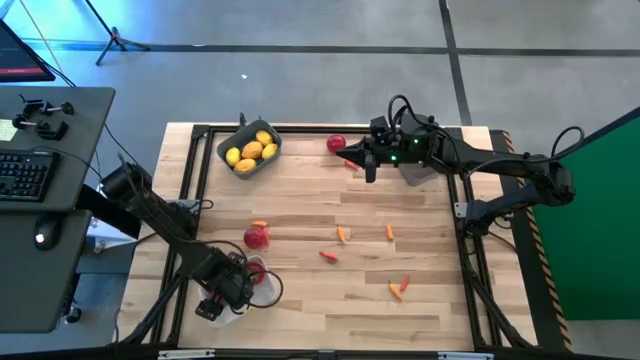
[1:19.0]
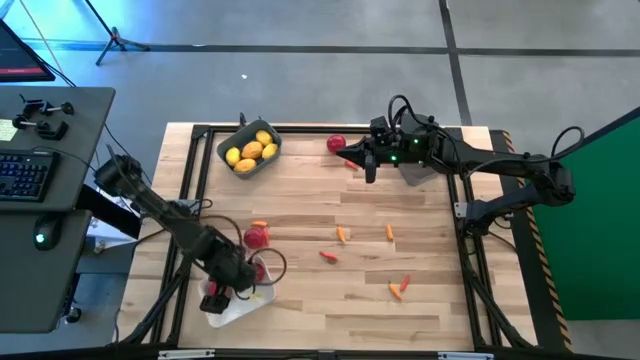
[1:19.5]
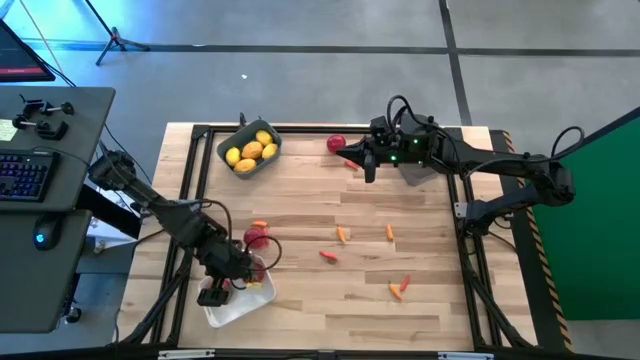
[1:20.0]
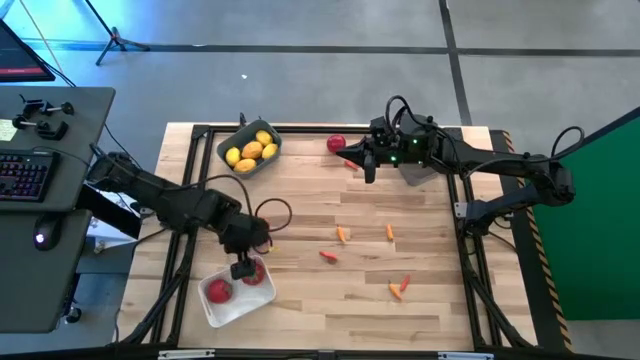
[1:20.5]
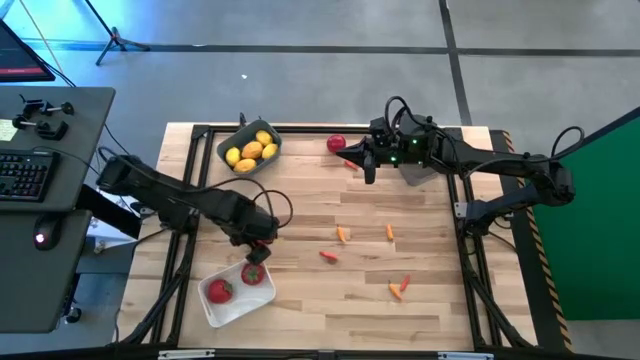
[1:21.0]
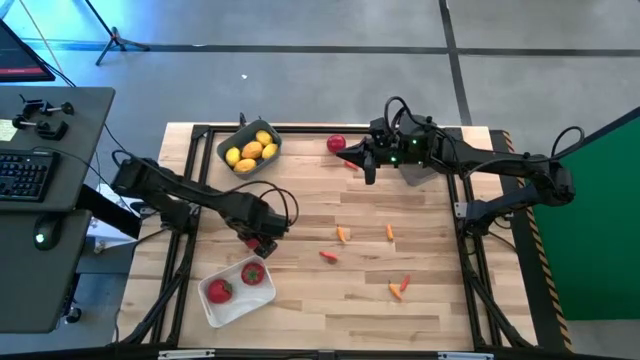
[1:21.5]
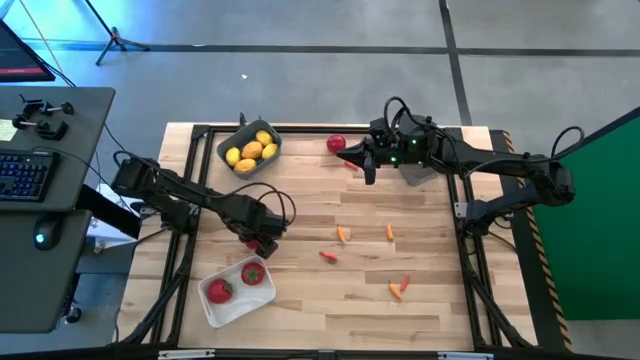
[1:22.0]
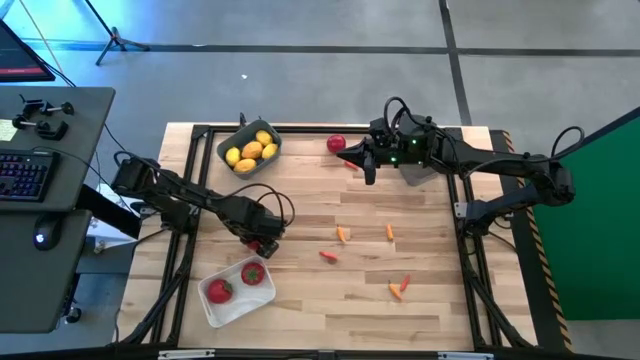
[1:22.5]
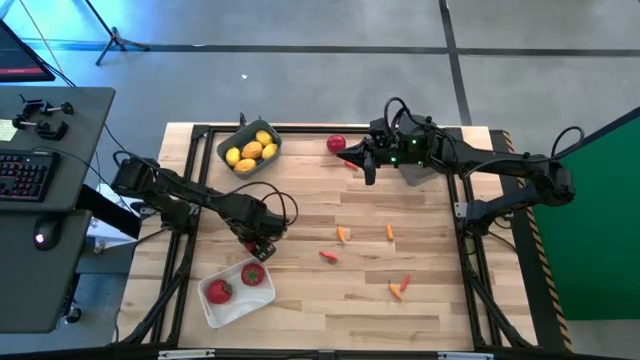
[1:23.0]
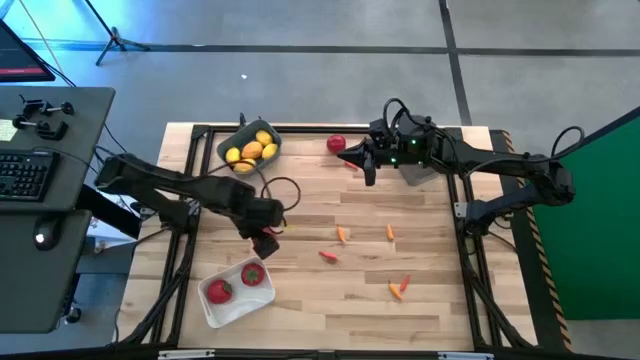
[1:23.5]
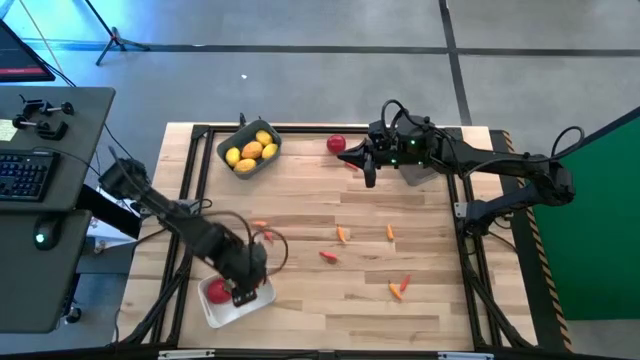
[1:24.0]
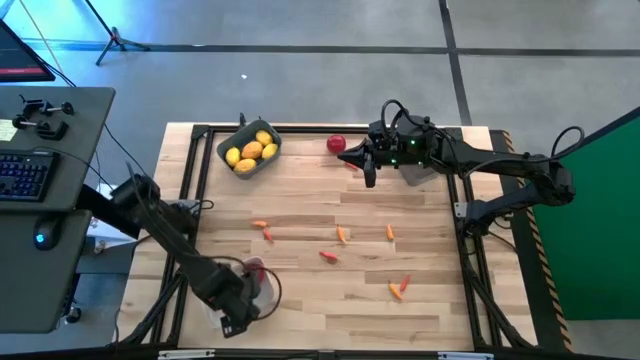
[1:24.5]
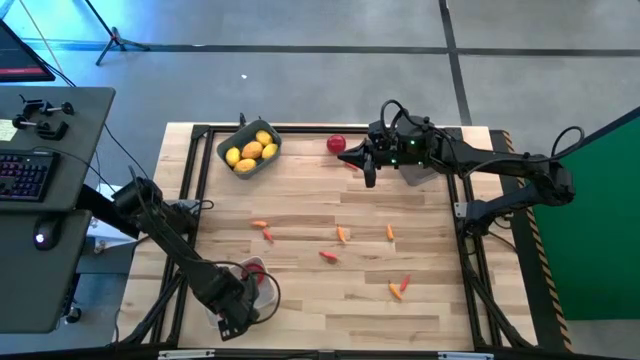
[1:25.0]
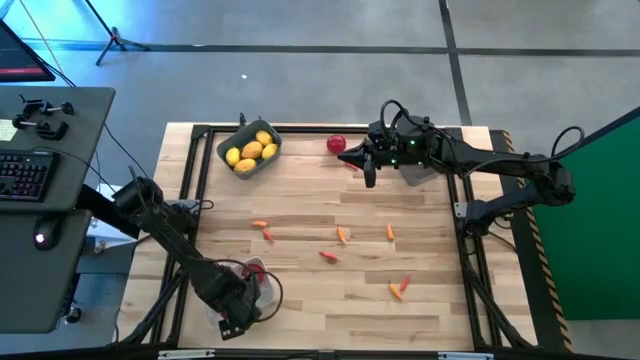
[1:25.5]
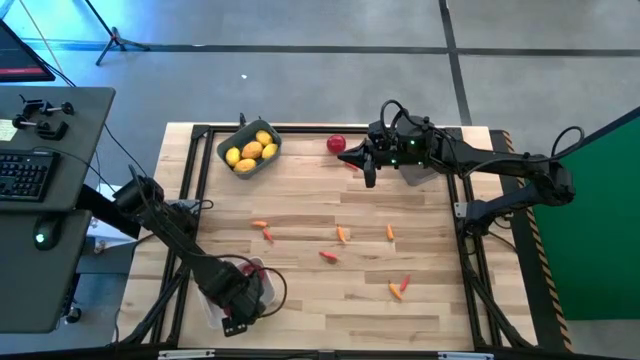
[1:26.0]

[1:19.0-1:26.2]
Task: Sort produce into baskets
Put the red tomato into the white bin

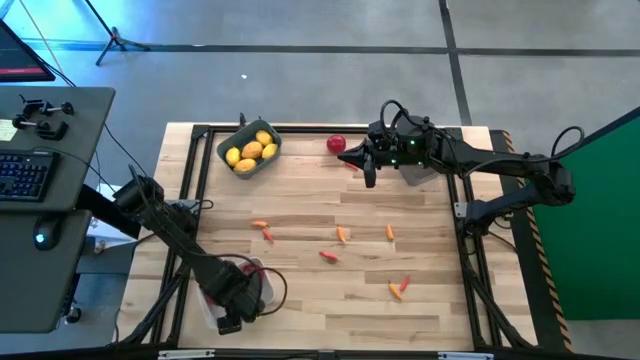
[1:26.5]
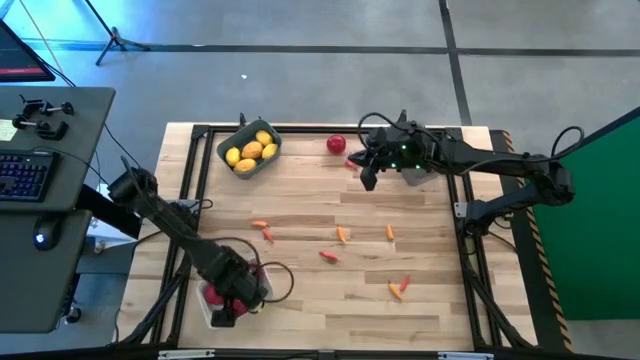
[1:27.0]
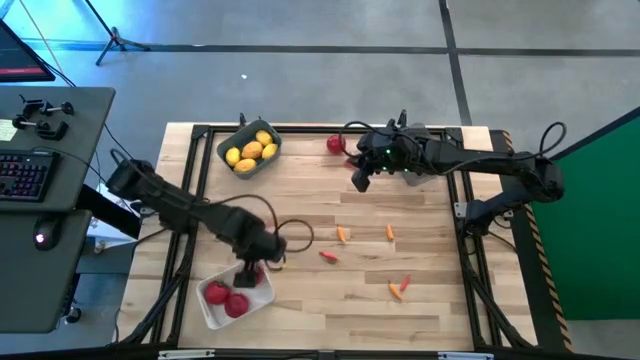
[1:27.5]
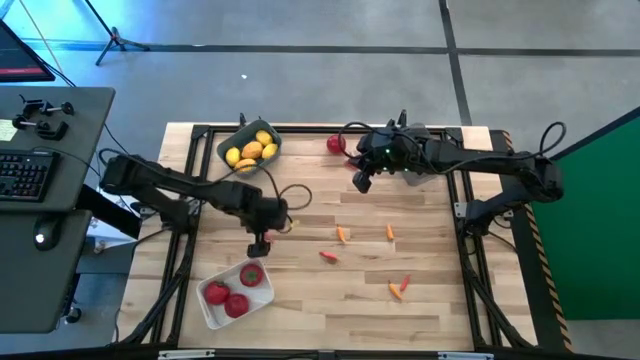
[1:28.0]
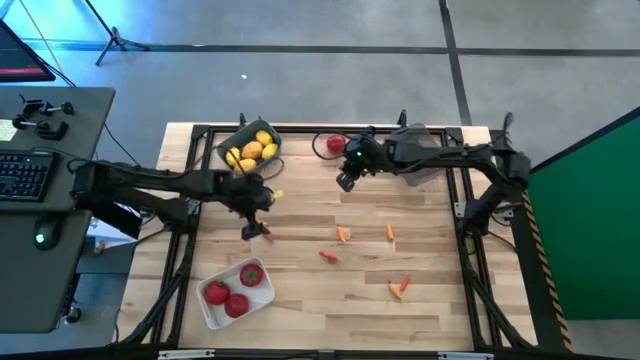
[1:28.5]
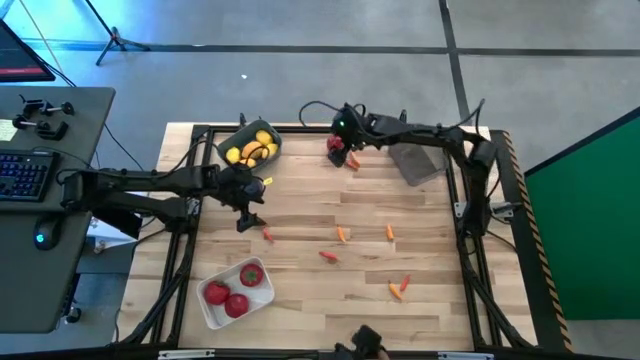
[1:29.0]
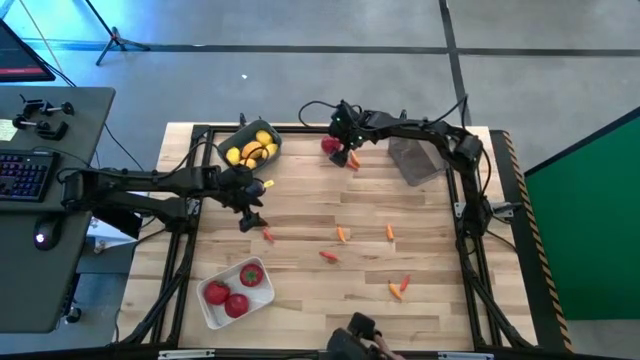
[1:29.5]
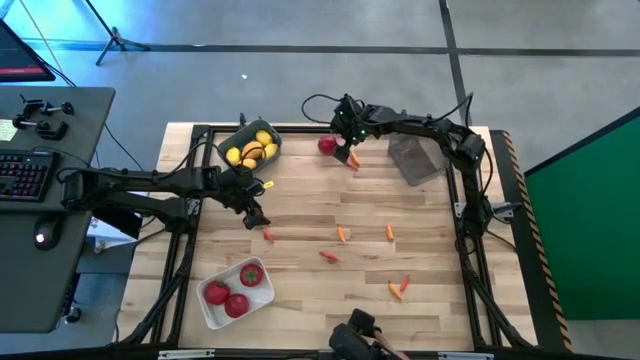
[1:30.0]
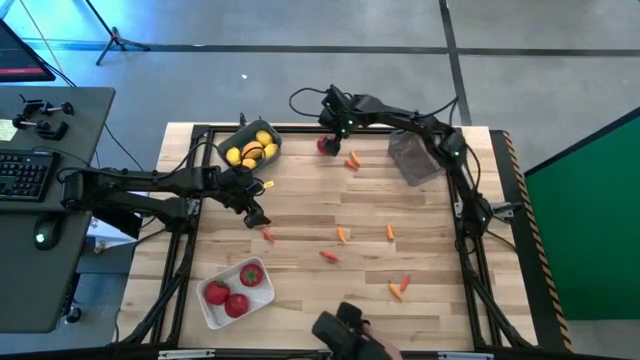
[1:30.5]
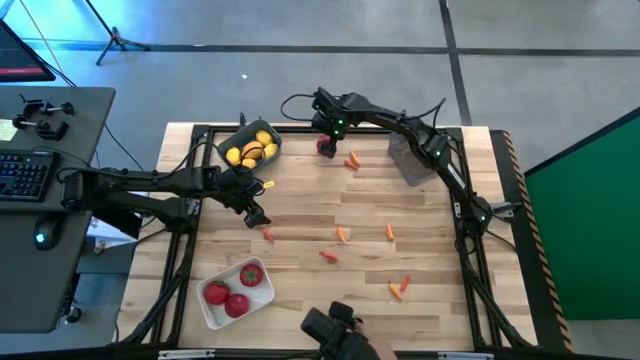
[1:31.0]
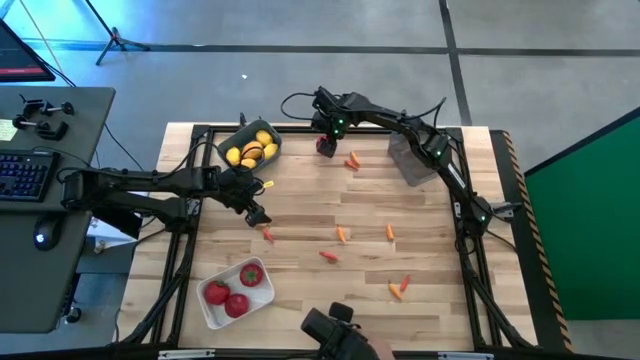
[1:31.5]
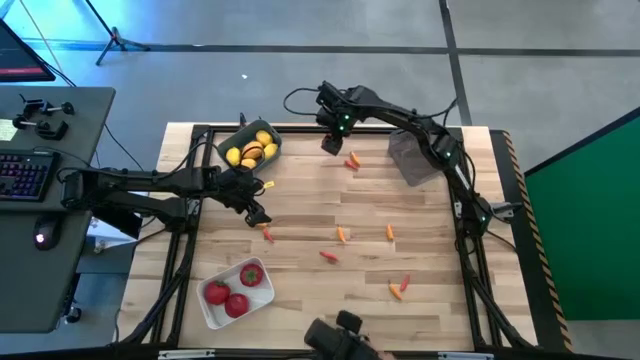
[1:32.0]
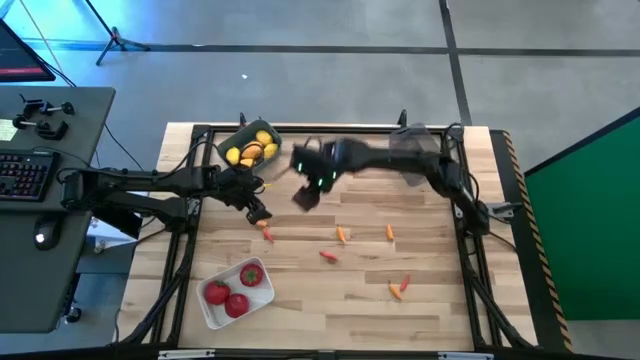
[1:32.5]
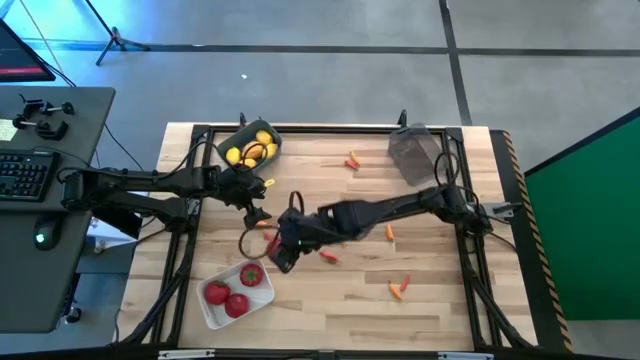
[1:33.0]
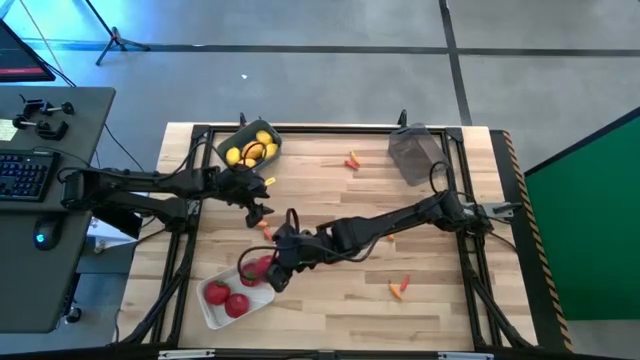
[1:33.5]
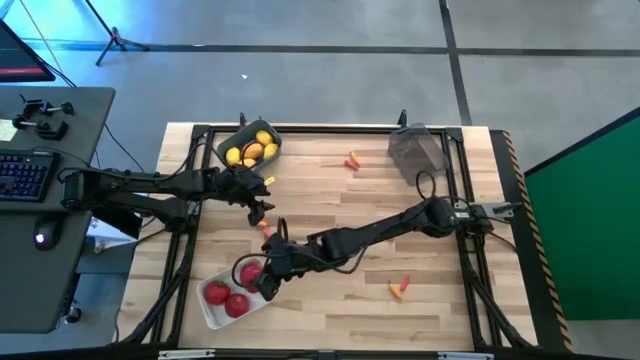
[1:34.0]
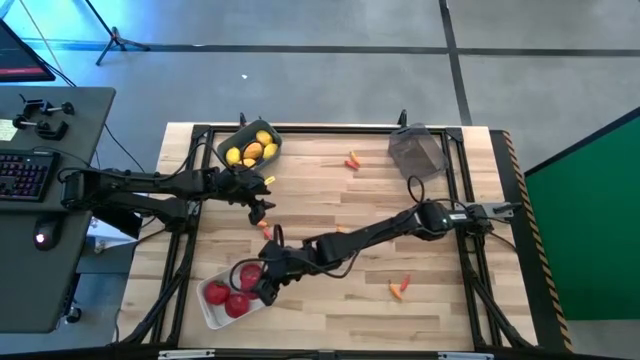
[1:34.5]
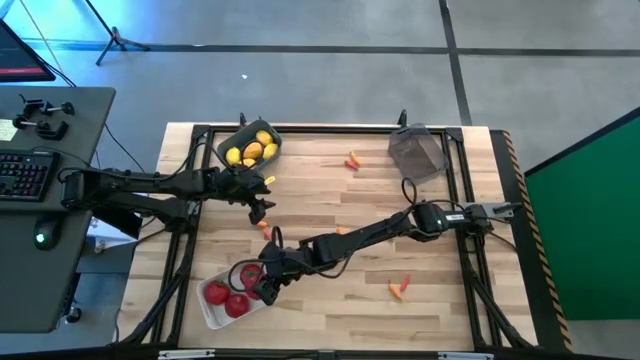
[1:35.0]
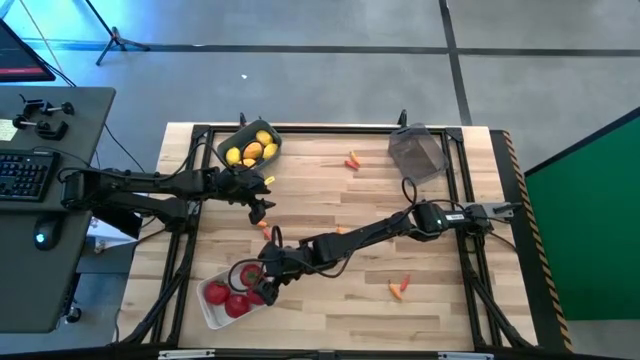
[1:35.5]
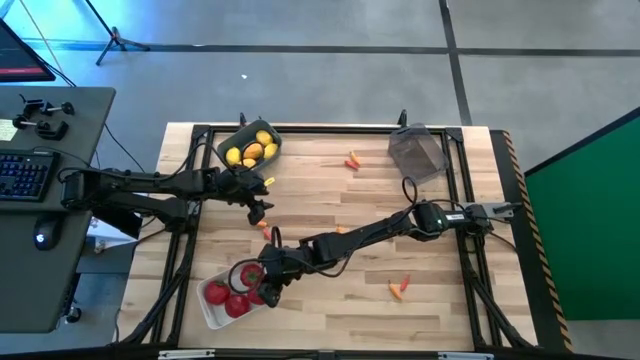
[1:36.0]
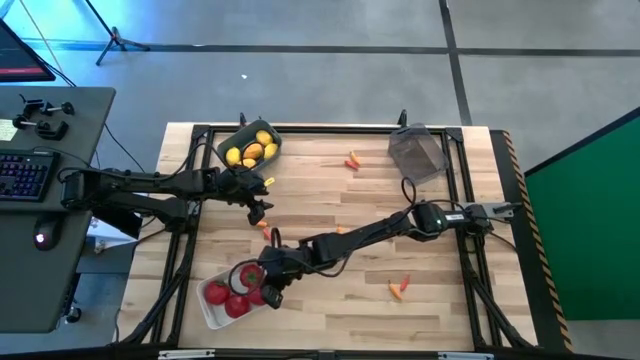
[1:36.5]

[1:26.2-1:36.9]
Put the red tomato into the white bin

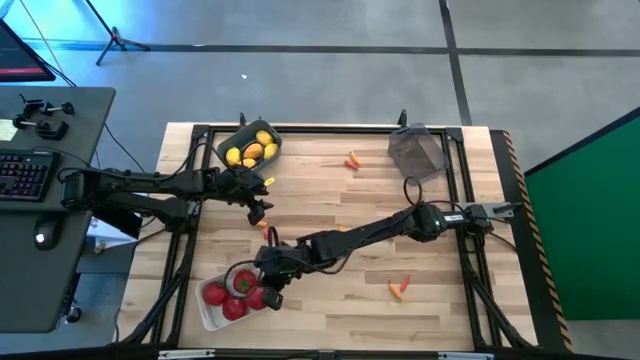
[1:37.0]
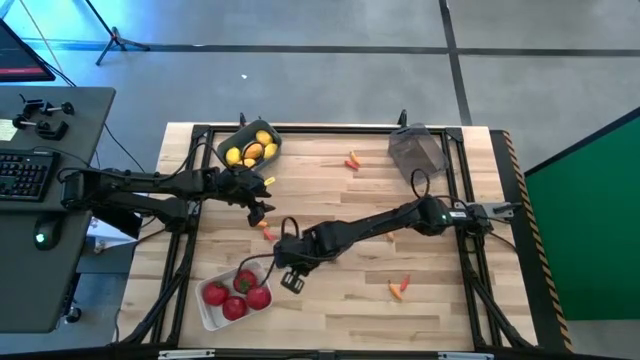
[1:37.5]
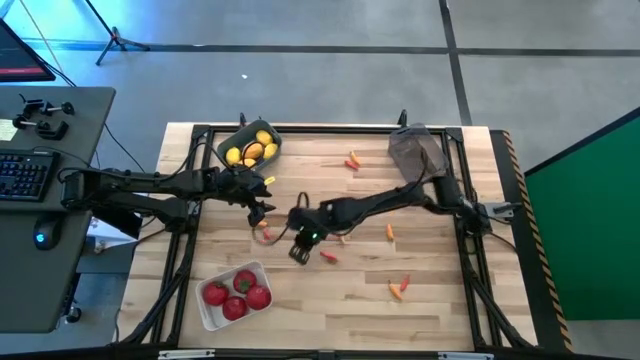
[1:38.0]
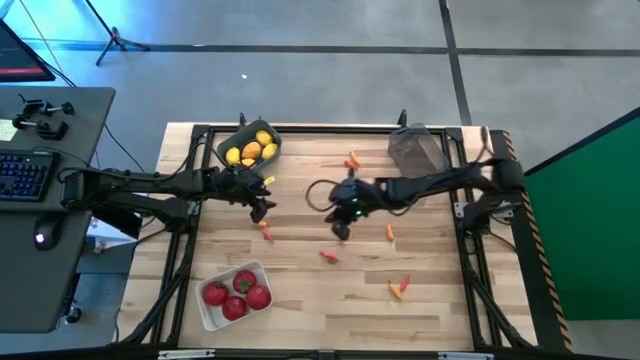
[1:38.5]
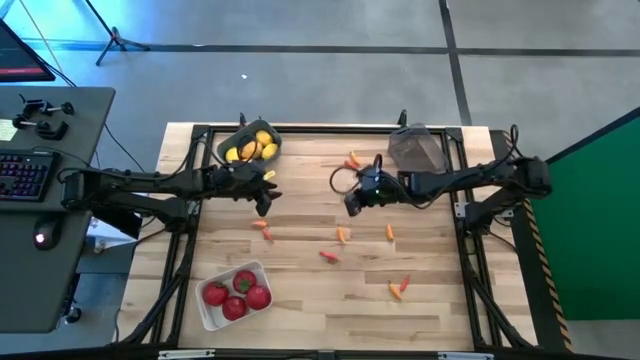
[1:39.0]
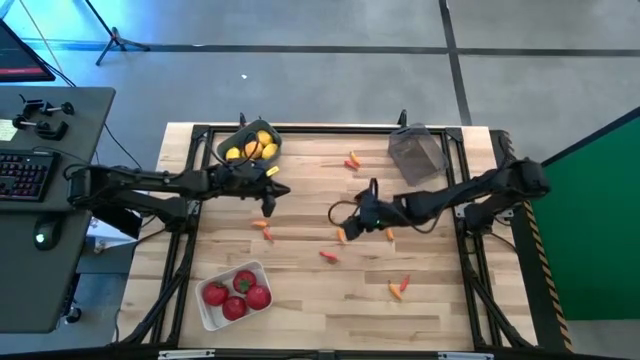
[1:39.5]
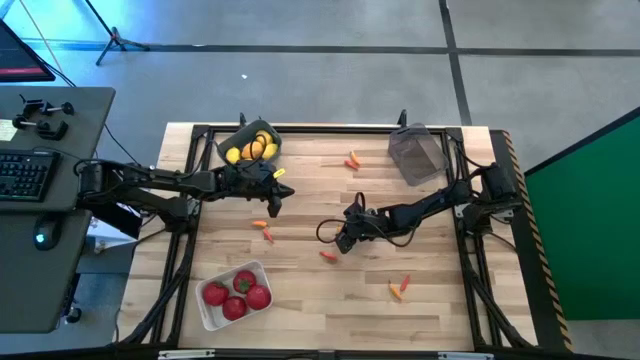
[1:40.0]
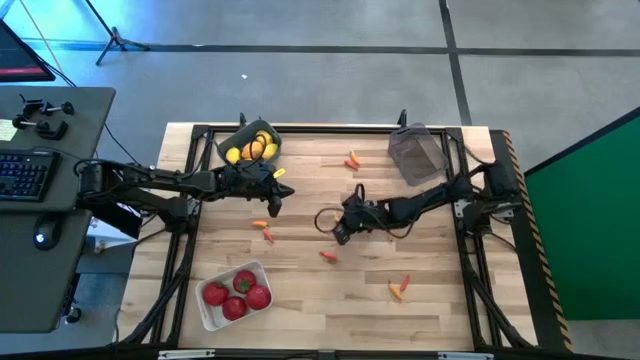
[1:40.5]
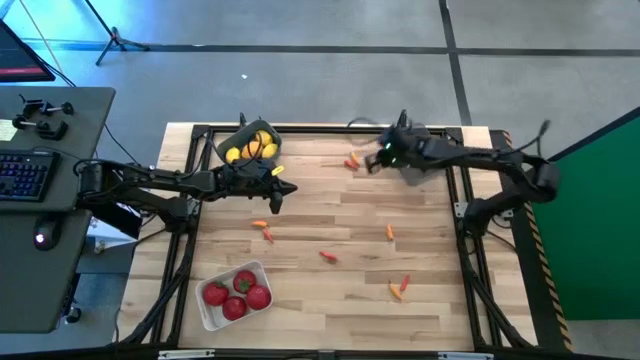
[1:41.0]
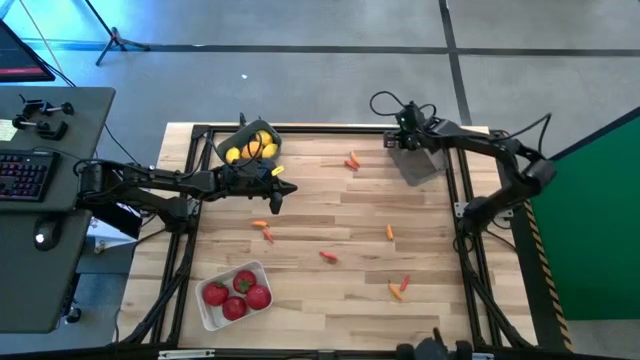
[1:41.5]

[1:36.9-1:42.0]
Put the yellow chili pepper into the black bin
